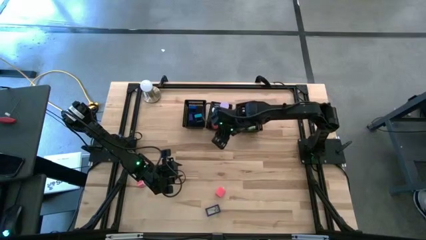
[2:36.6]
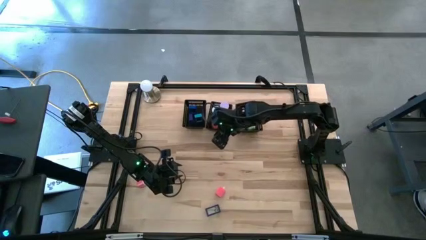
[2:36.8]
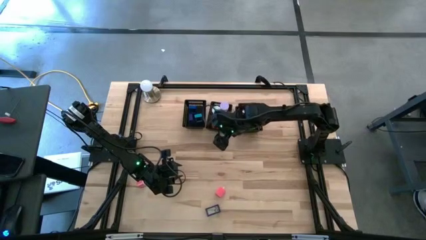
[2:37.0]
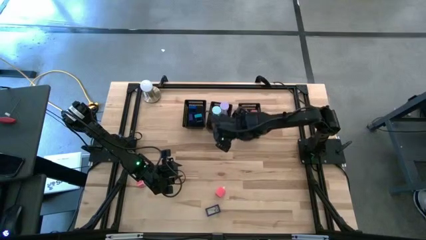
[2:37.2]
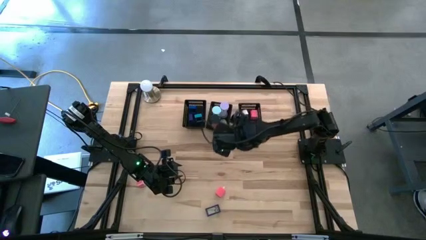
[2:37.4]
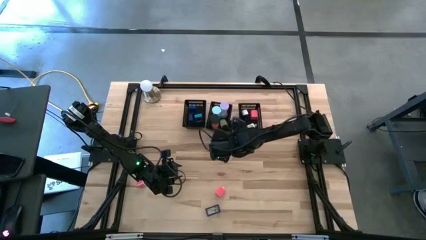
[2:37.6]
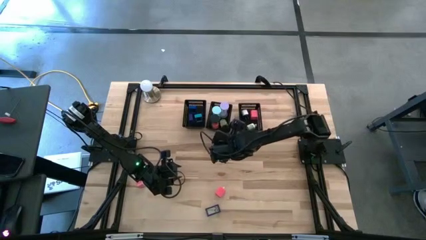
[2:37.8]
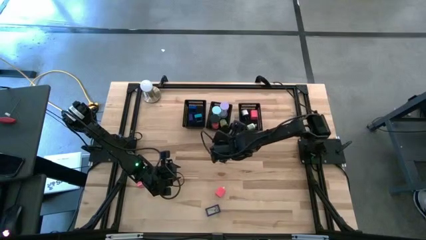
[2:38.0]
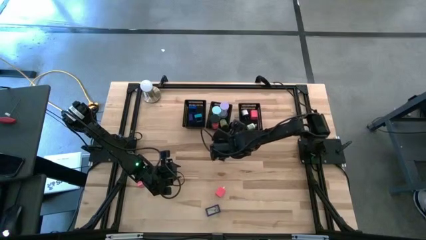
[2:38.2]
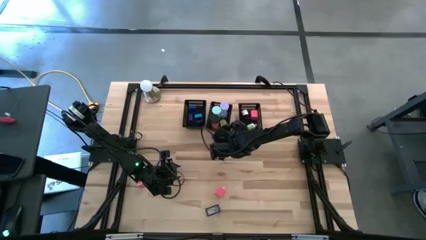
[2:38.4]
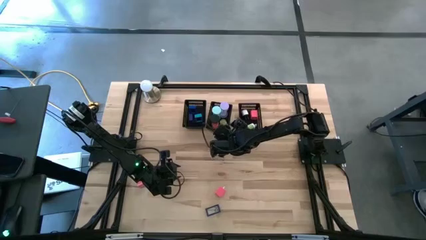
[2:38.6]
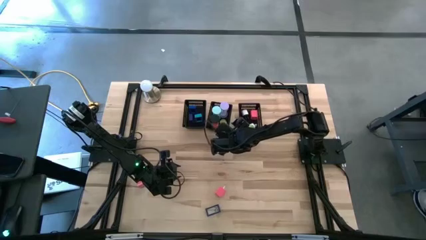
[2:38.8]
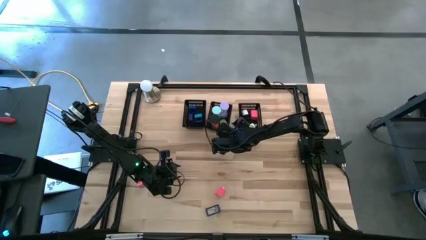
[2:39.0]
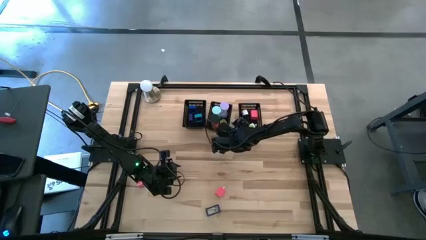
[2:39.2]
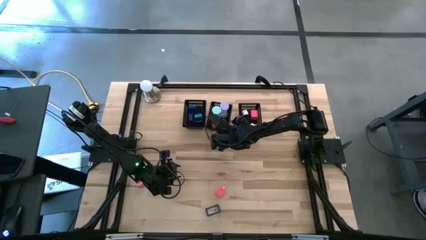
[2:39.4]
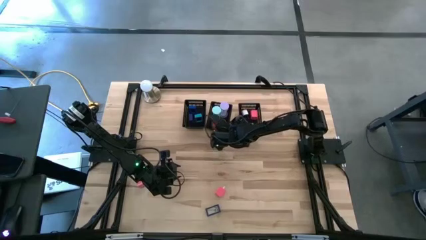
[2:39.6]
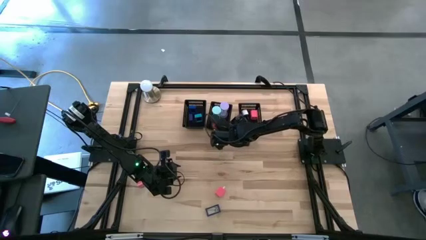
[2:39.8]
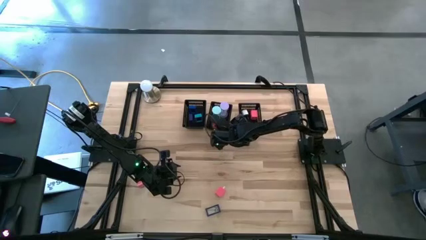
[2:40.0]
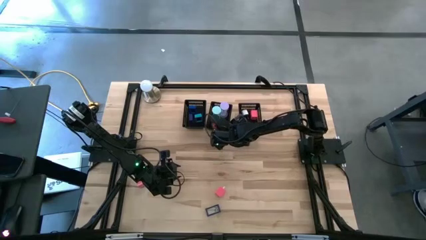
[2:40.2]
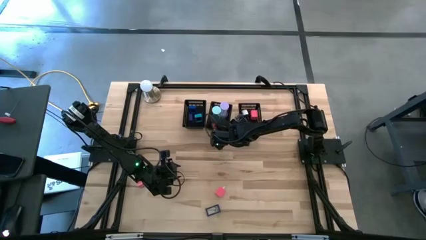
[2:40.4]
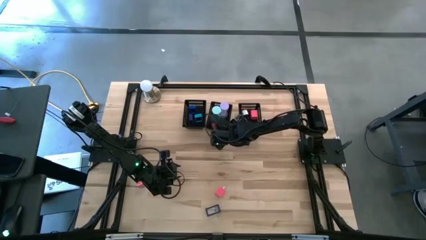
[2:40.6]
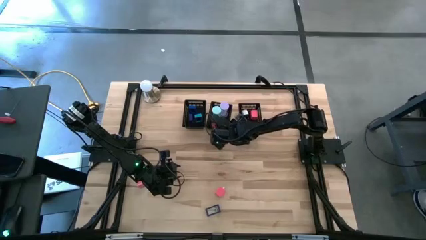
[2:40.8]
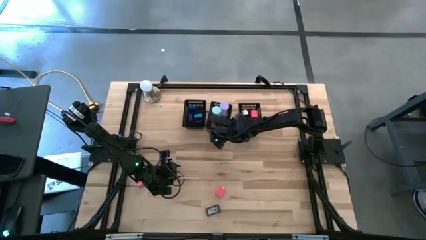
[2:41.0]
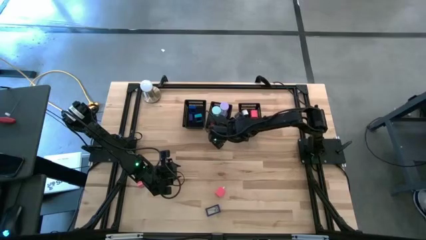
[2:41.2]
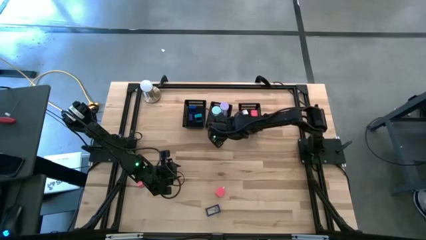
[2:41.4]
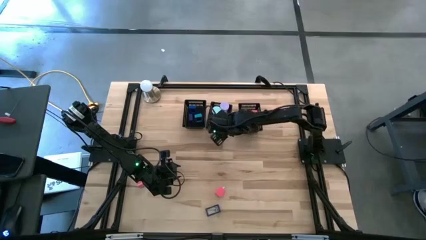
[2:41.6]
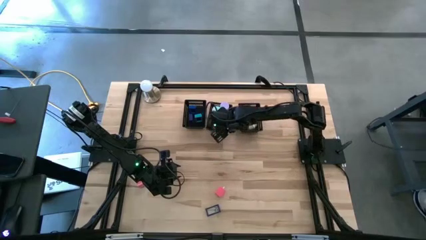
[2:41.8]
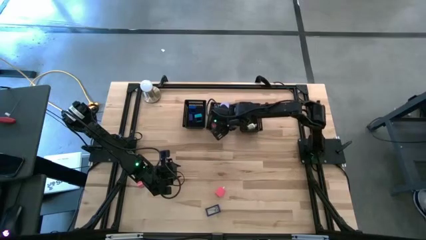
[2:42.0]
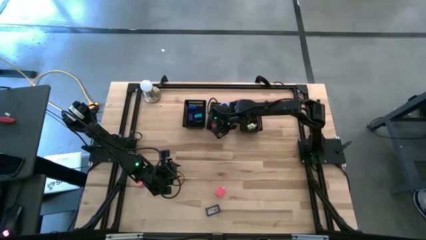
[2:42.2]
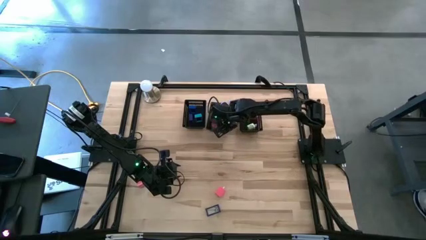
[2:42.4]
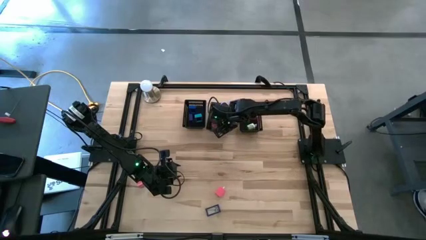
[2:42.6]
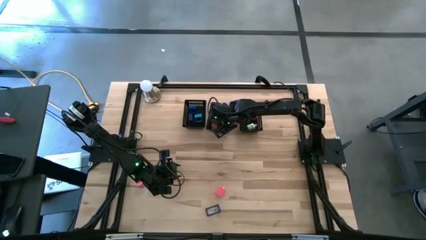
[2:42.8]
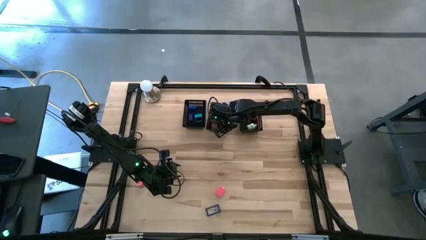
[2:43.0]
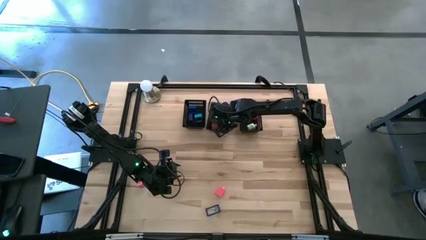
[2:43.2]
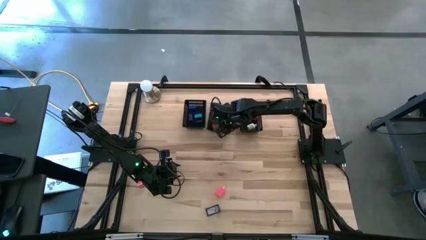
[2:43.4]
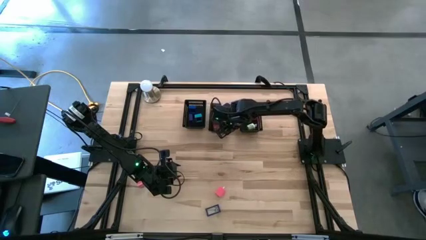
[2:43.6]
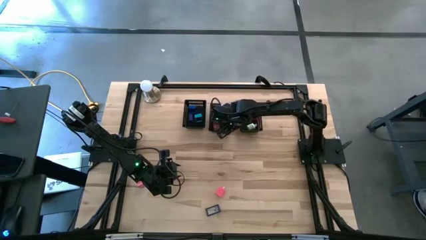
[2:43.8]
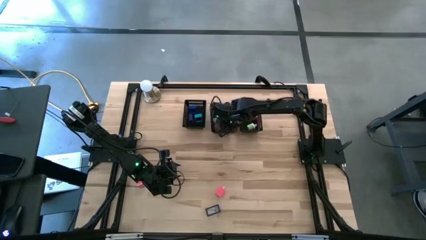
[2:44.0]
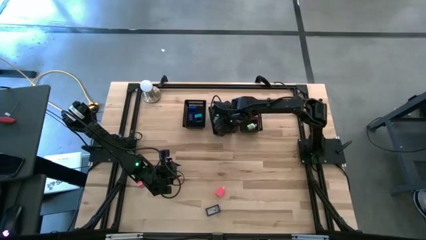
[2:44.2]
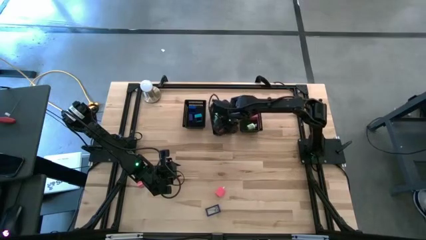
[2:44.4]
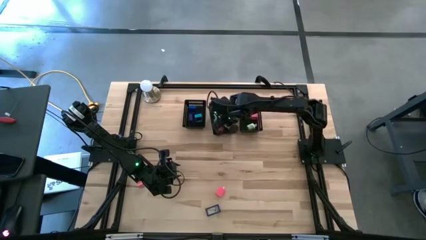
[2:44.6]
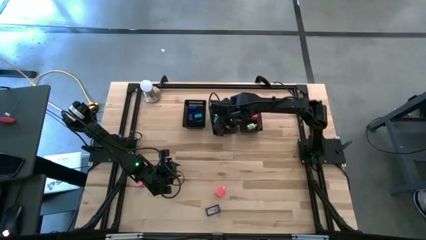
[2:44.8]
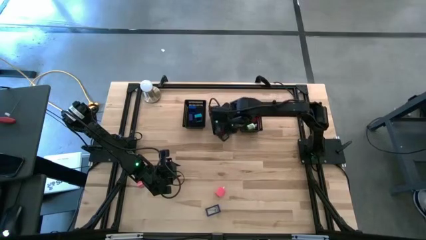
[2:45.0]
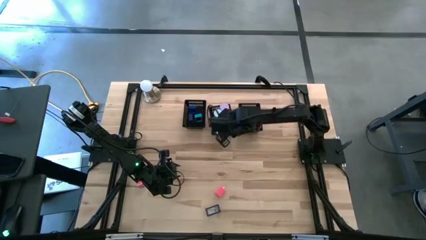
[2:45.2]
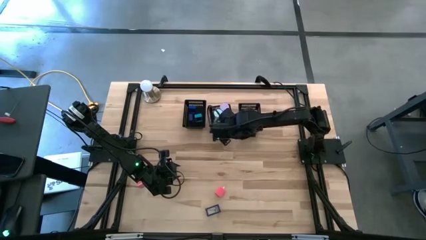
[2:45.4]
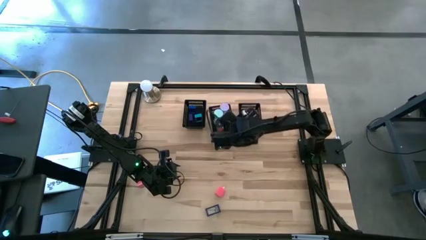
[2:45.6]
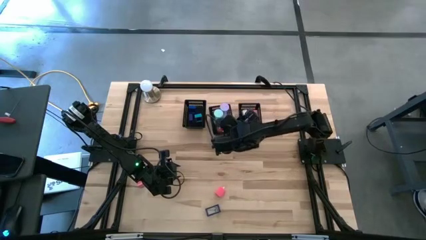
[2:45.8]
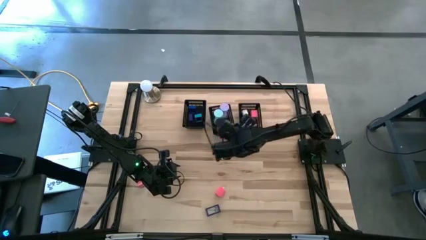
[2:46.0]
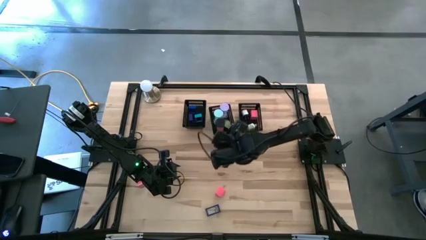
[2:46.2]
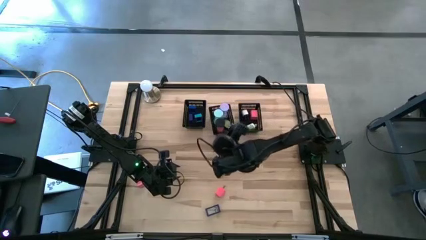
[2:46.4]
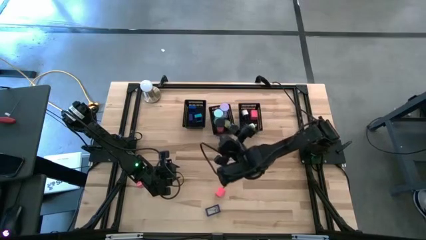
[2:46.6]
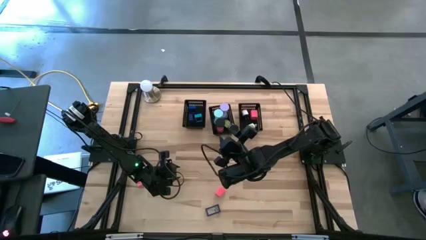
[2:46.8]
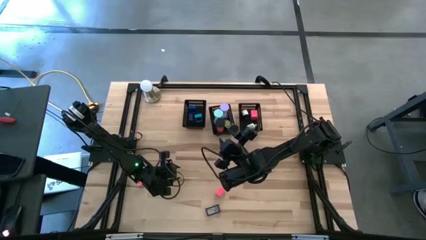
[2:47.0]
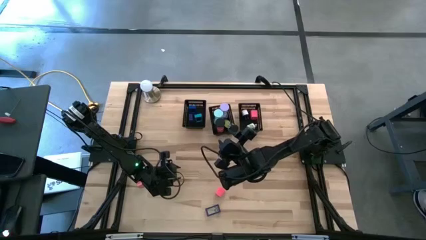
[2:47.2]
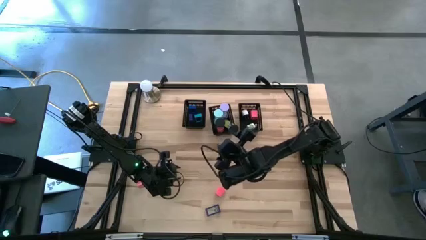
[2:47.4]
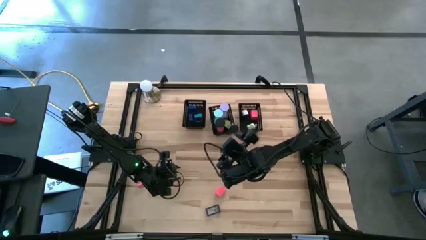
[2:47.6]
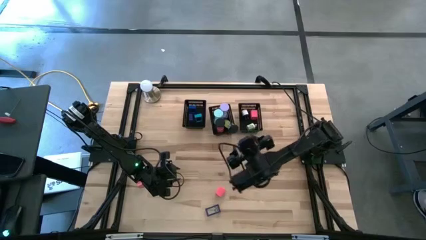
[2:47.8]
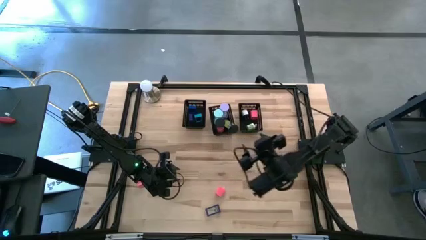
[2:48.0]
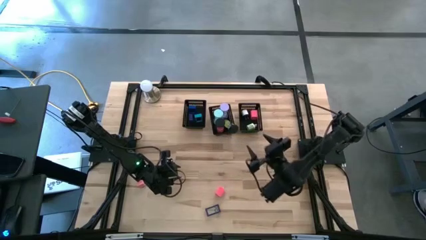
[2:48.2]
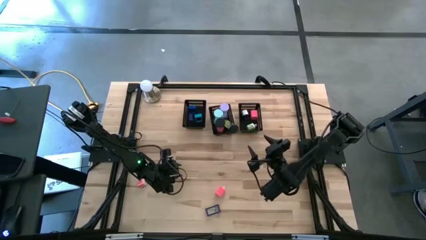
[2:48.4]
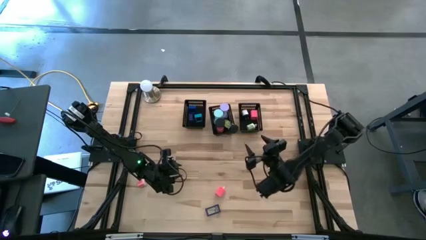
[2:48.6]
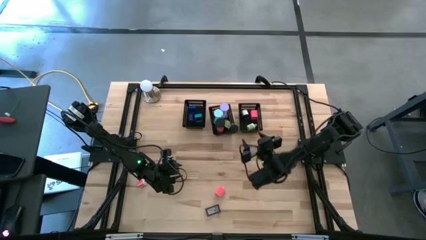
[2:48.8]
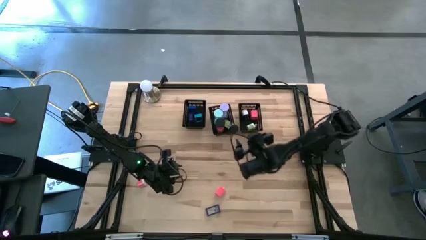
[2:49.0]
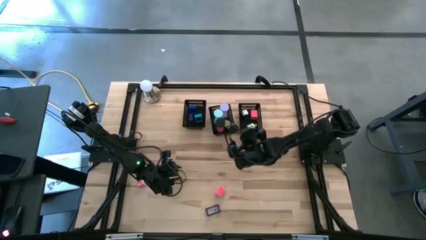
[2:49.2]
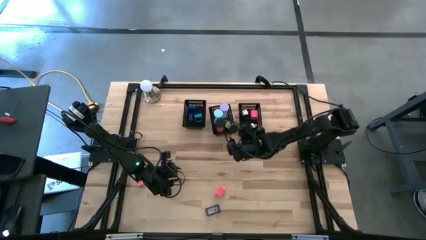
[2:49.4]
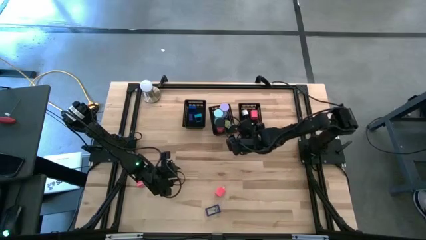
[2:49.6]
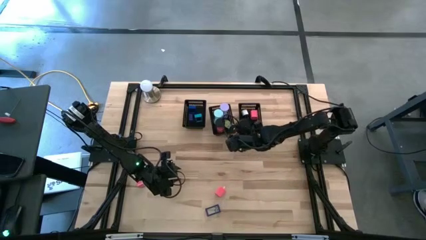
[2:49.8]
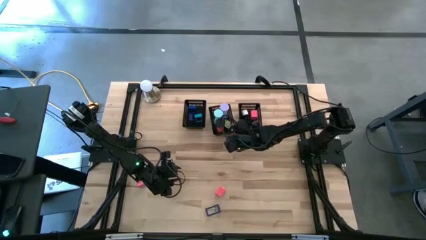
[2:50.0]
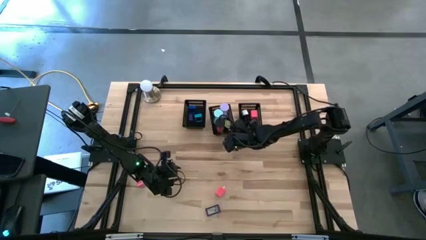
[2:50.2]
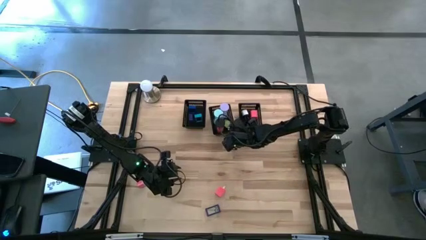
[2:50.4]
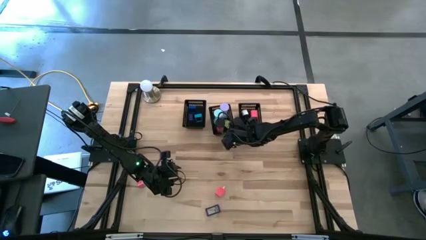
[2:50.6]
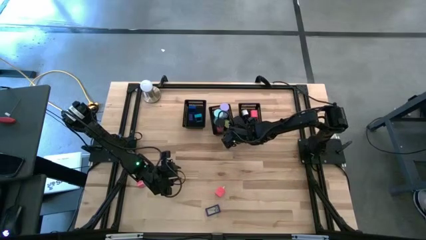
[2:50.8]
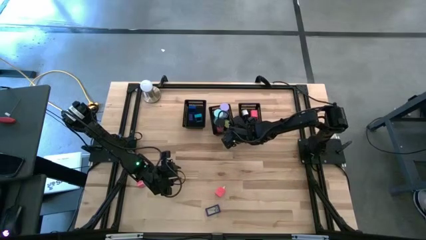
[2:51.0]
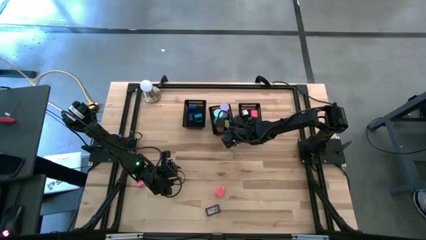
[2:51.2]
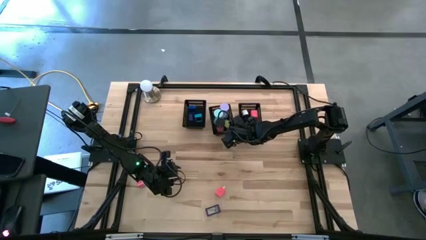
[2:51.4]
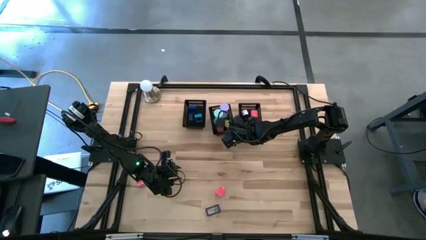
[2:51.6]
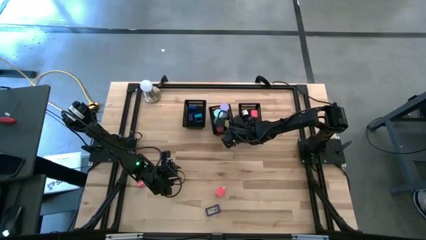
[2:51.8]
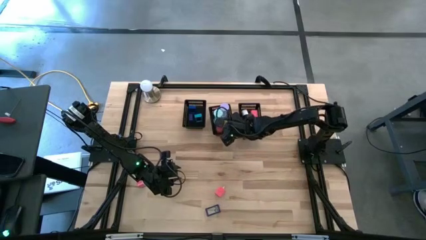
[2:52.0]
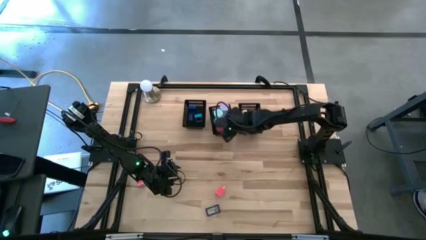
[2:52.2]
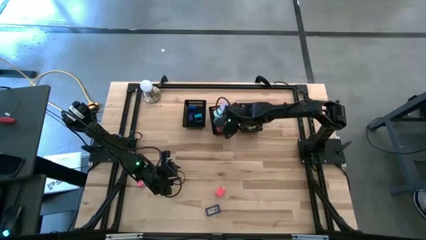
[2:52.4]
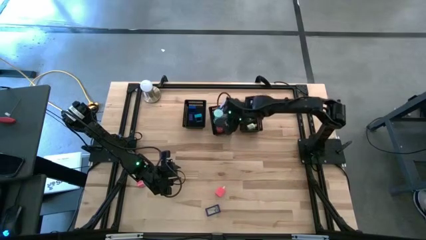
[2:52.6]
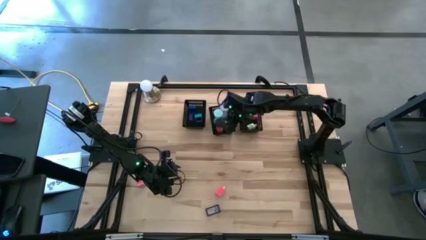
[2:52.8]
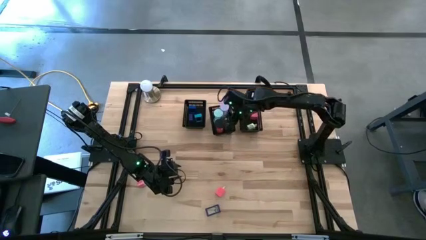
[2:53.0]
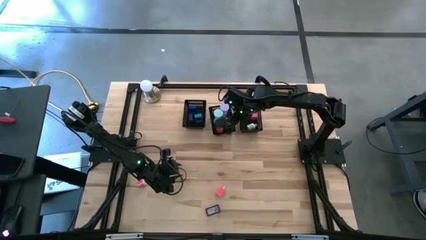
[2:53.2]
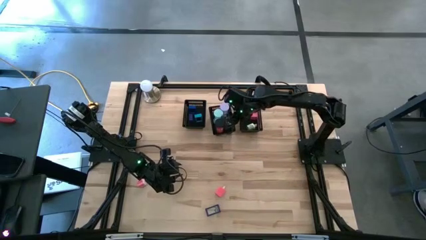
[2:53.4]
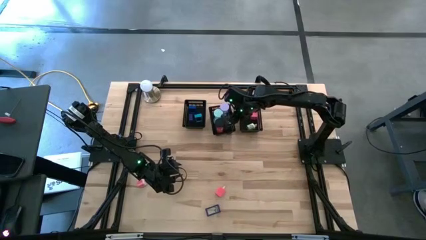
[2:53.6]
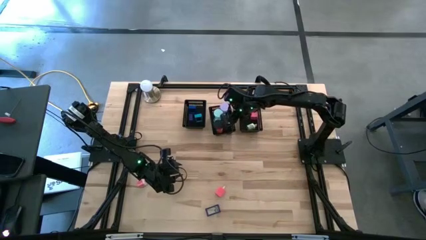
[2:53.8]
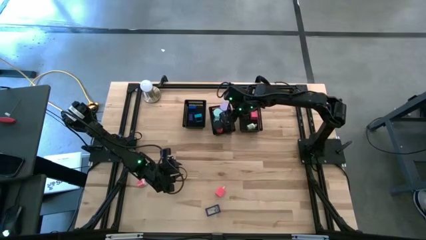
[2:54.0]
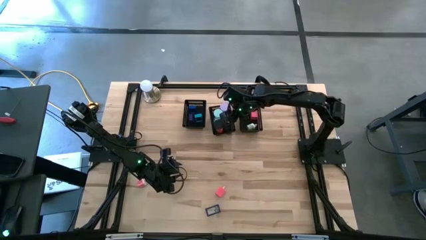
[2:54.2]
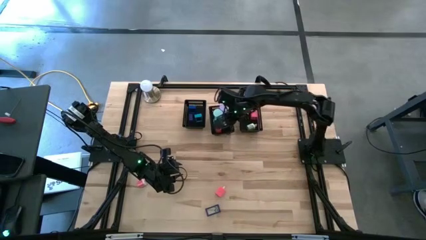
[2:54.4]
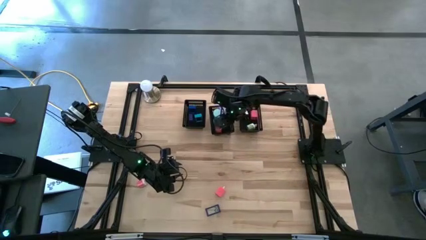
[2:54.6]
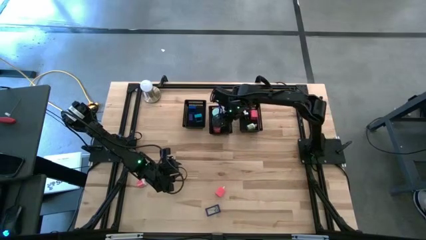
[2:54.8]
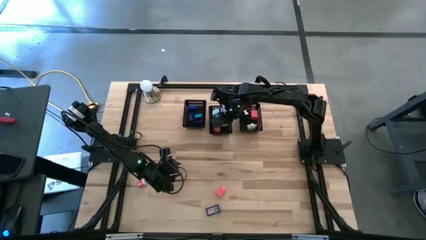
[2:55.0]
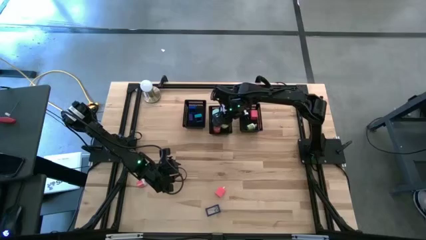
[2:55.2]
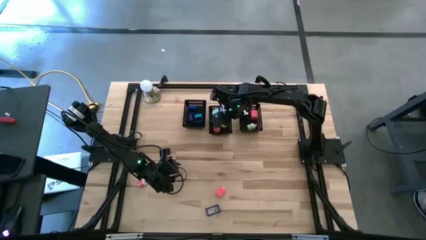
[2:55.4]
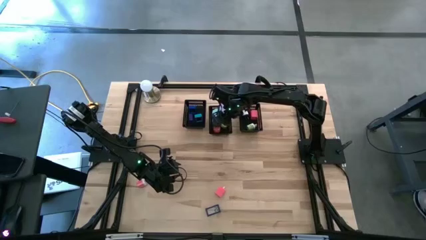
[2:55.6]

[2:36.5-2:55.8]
Task: Pick & Place Office items
Put the light green hourglass into the black bin
